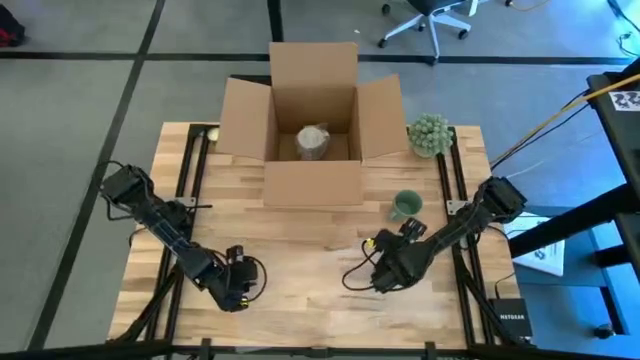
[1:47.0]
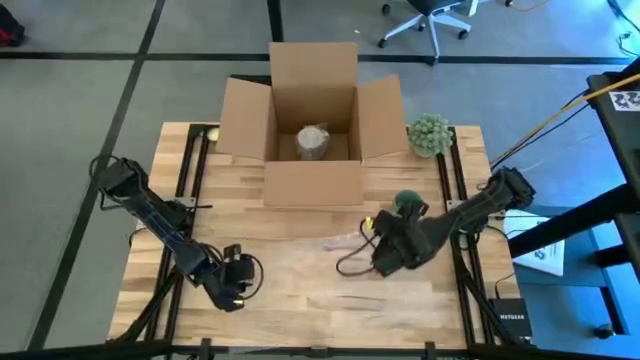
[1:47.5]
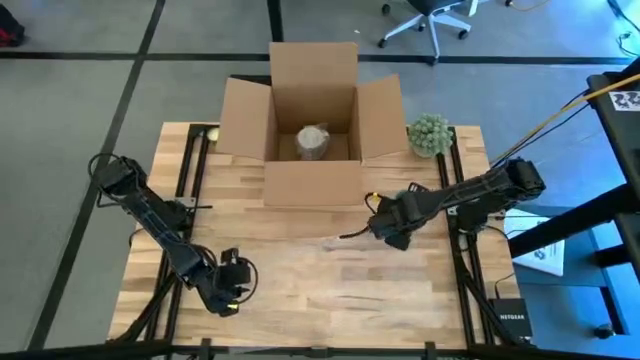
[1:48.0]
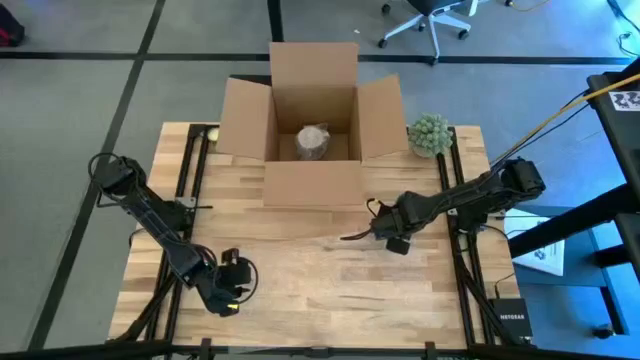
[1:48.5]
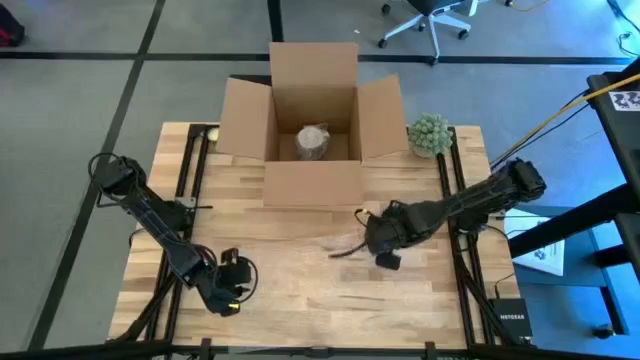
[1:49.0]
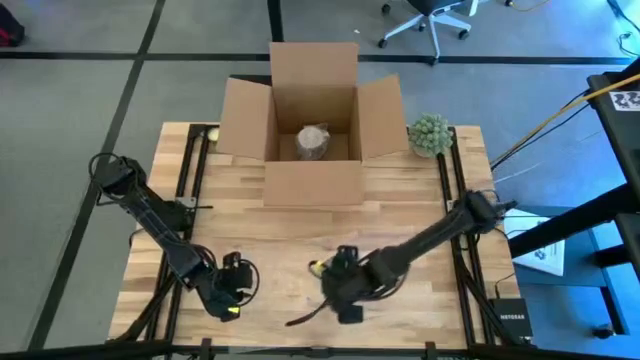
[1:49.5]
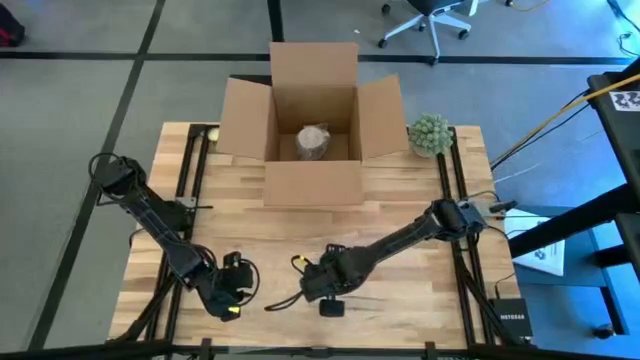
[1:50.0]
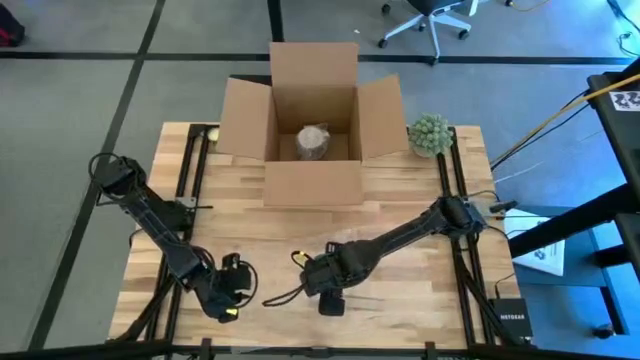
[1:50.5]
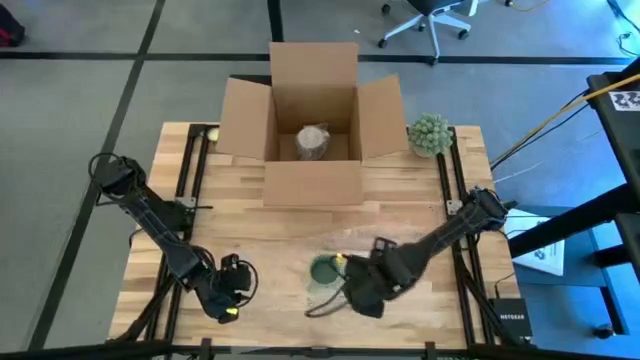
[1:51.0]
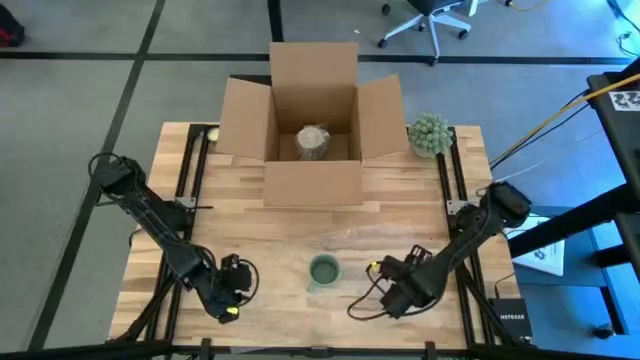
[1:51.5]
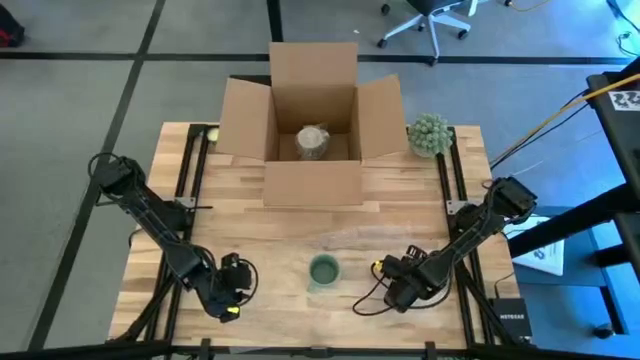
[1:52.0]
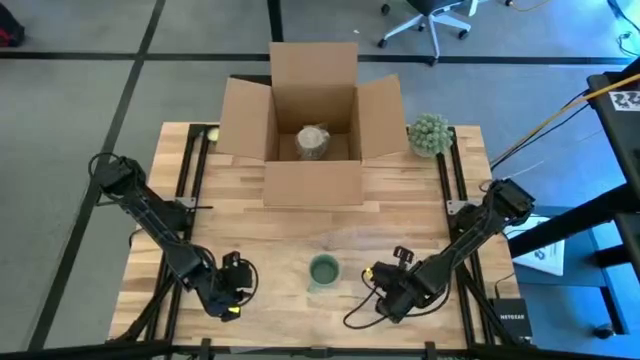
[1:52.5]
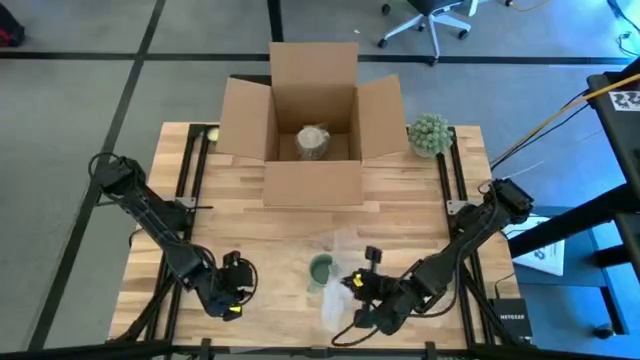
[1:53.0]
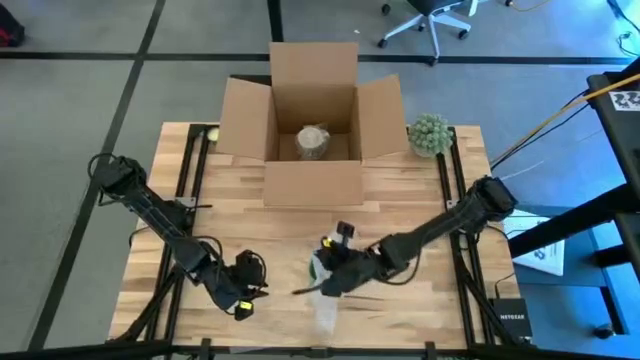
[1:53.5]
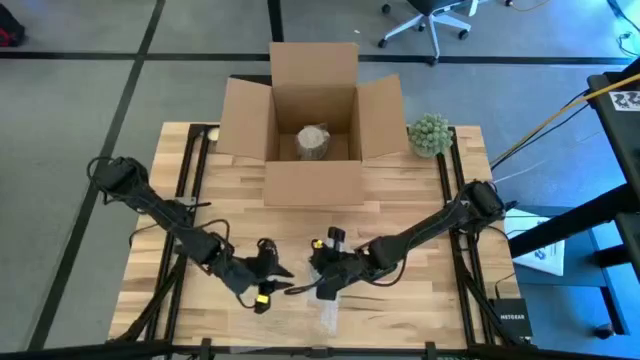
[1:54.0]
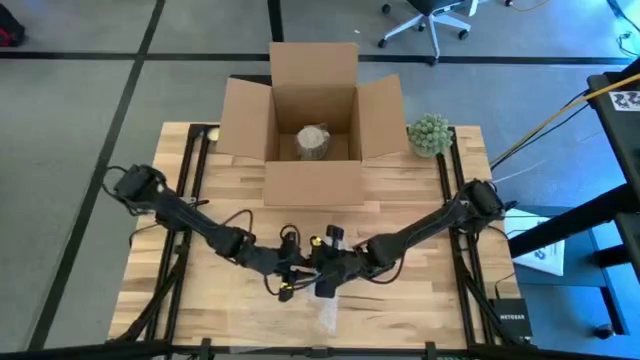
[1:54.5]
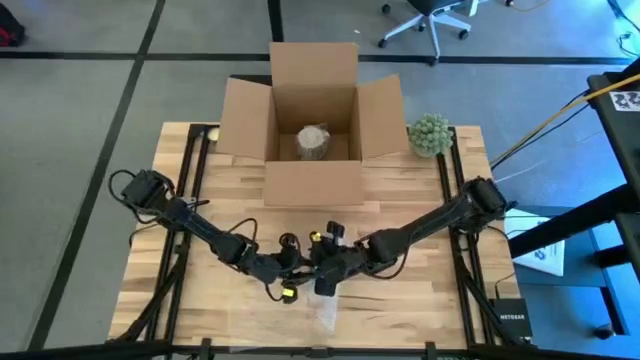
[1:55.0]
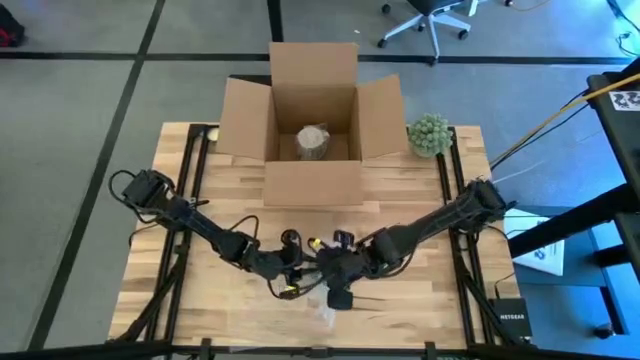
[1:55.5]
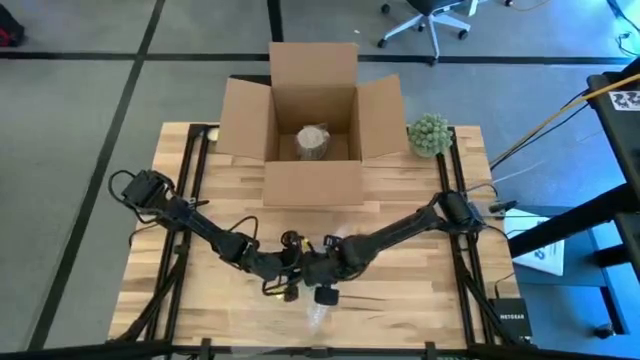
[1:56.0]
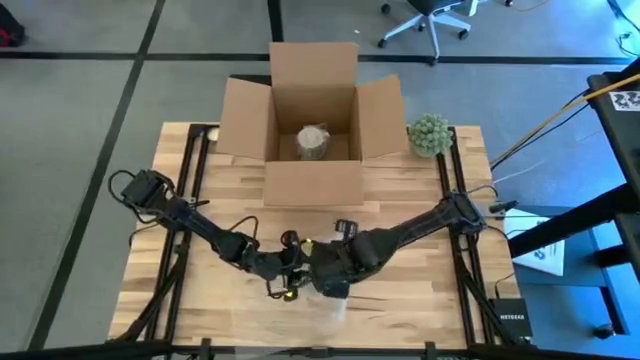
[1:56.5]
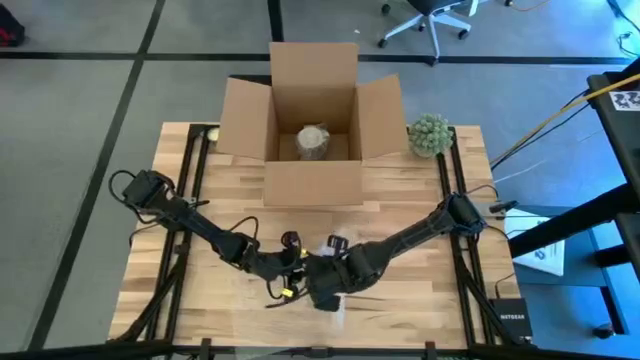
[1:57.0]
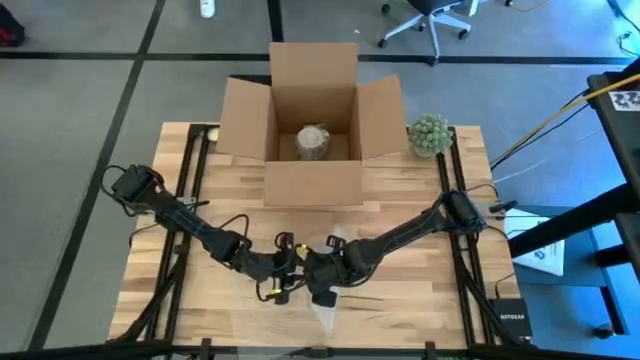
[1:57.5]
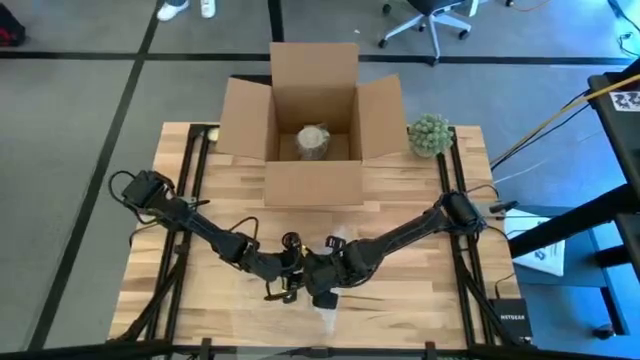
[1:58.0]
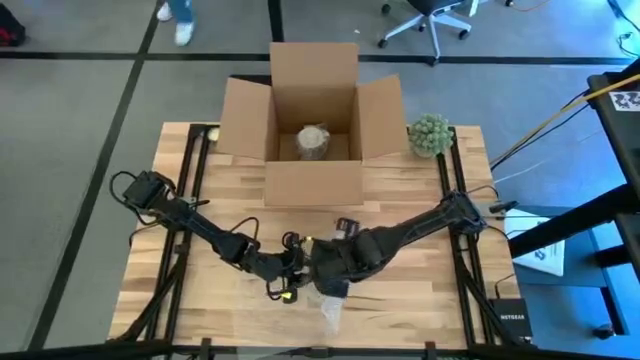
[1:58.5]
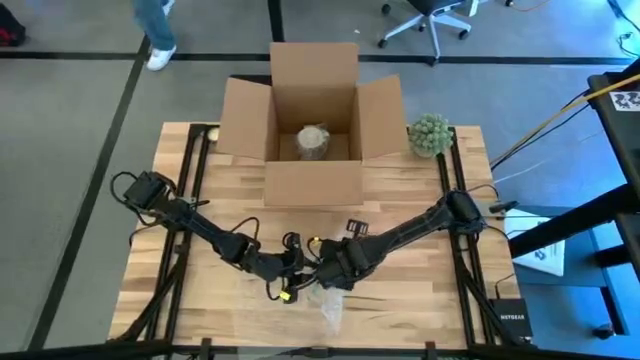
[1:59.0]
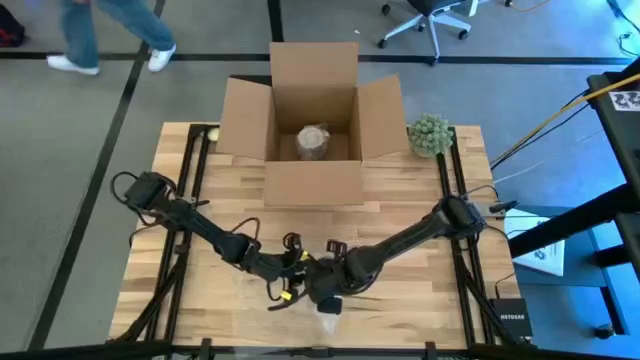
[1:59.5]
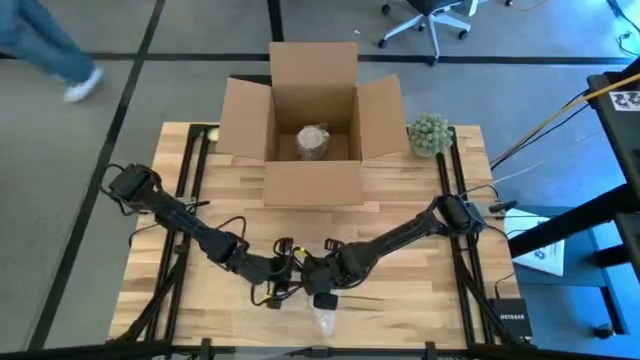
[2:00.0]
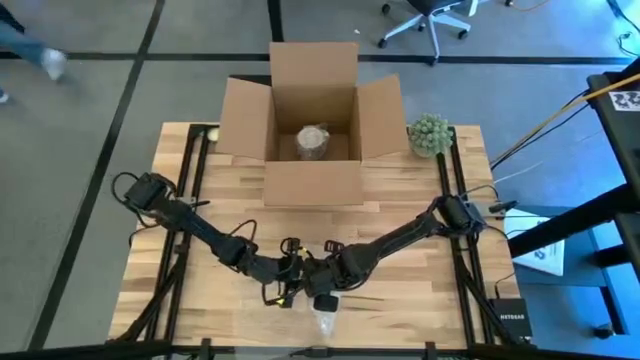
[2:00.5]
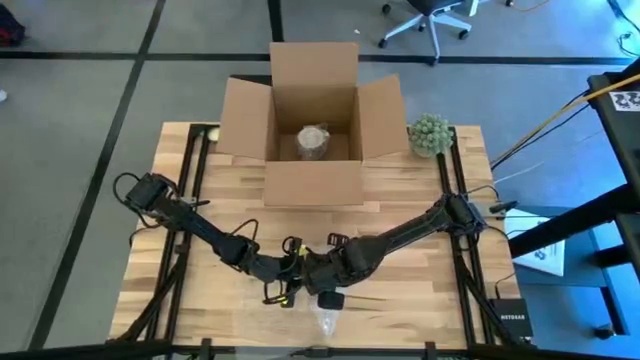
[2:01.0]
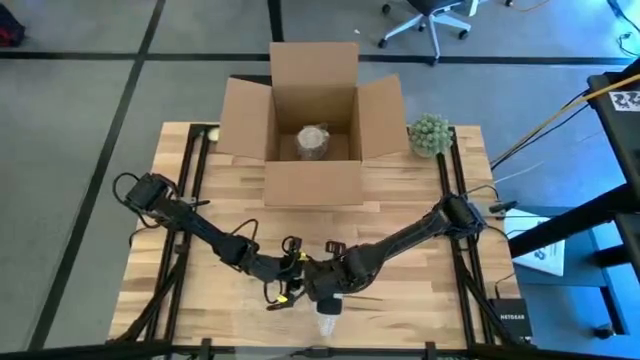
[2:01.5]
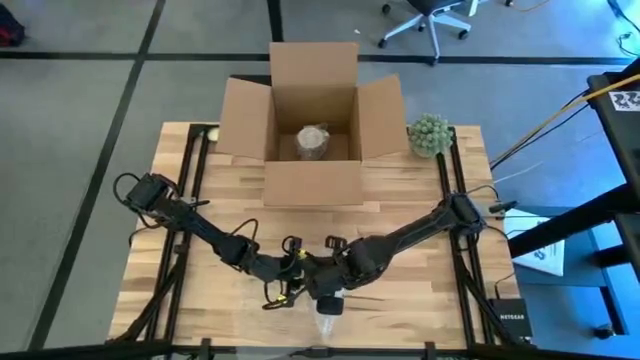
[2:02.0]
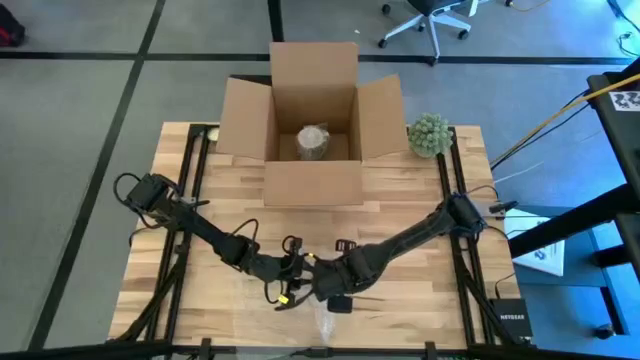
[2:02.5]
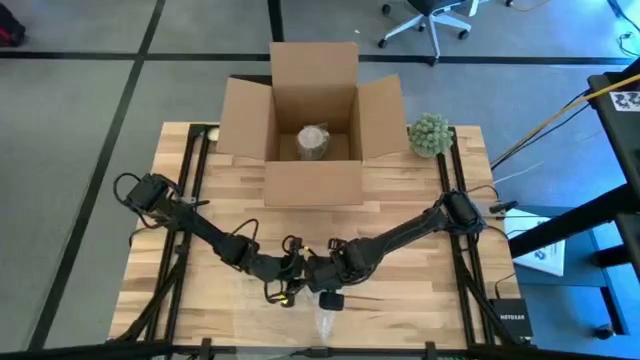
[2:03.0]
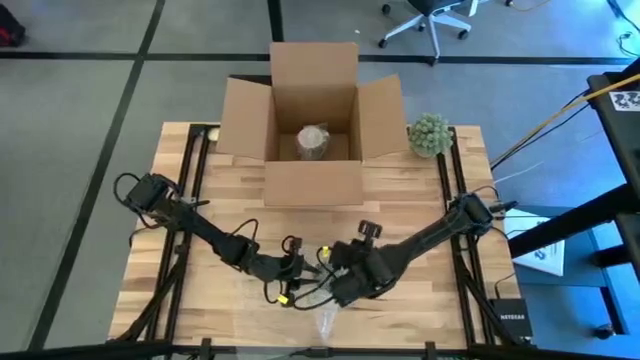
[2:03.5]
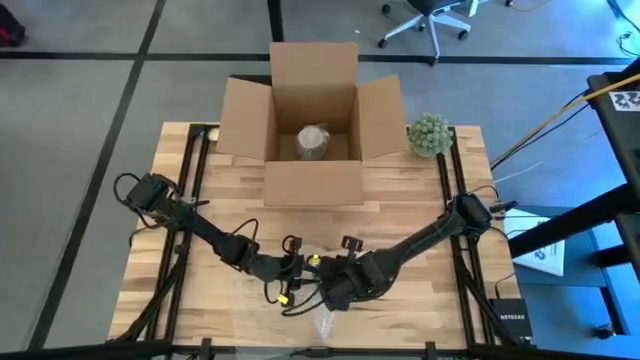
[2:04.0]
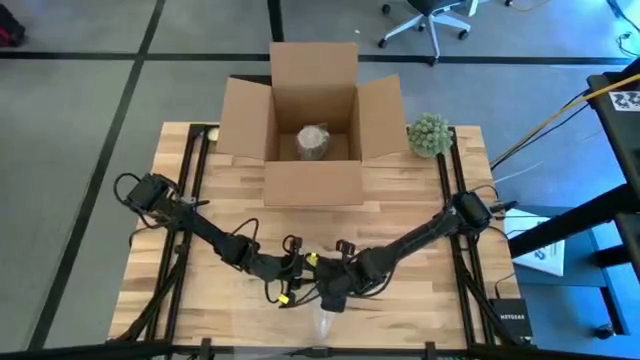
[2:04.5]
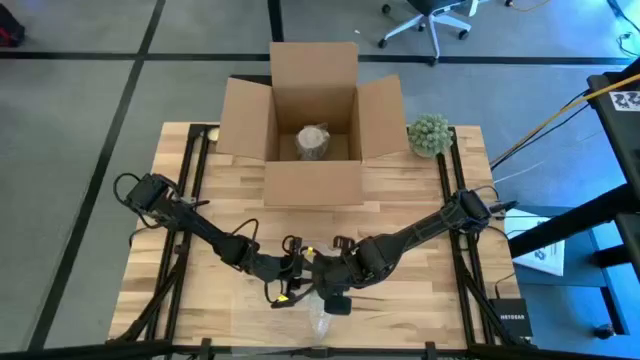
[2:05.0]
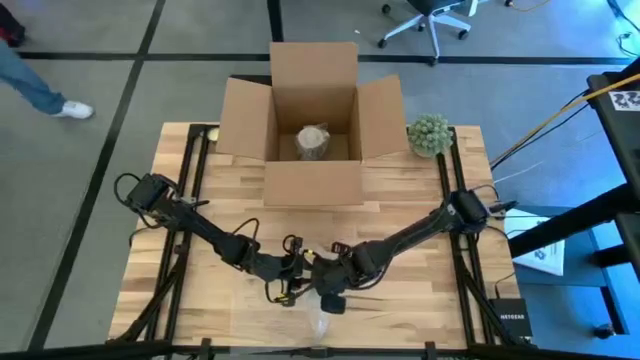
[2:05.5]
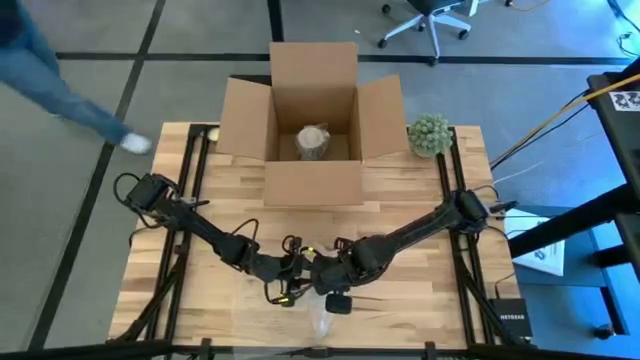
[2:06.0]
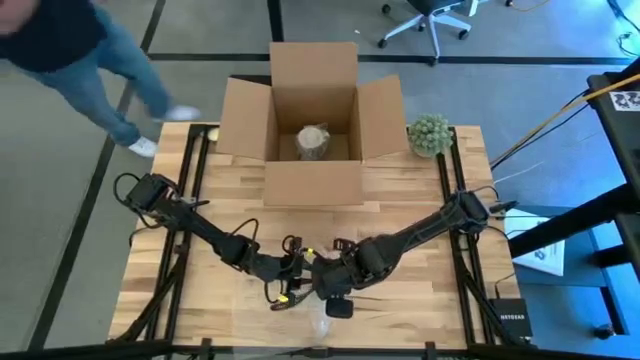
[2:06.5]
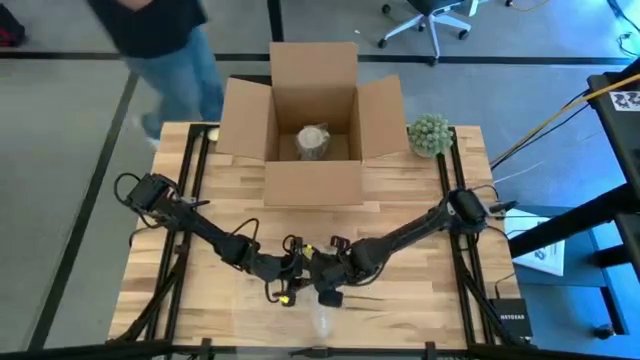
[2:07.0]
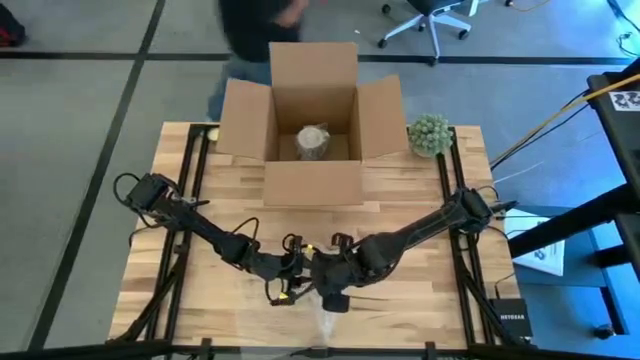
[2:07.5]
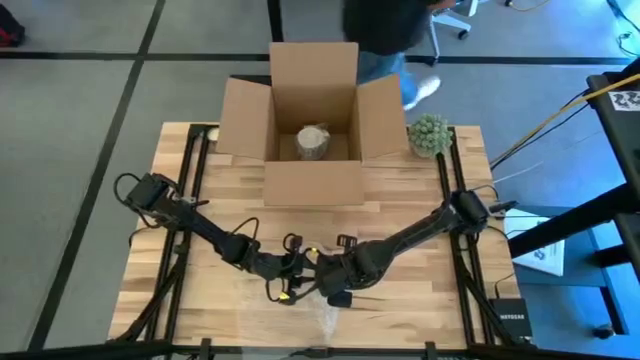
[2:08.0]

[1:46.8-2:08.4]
Task: wrap mug
Wrap the dark green mug using the transparent bubble wrap
